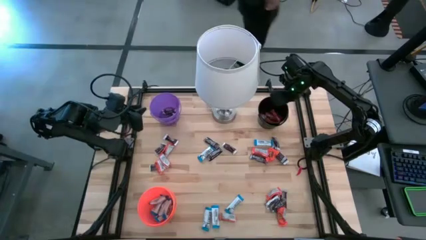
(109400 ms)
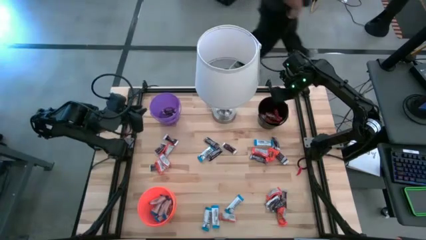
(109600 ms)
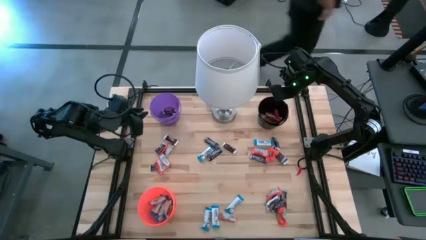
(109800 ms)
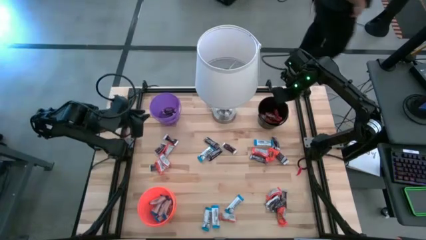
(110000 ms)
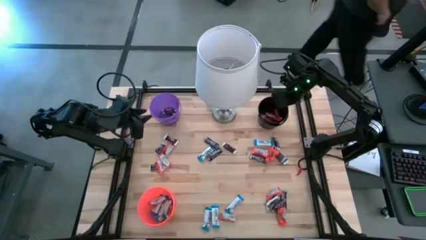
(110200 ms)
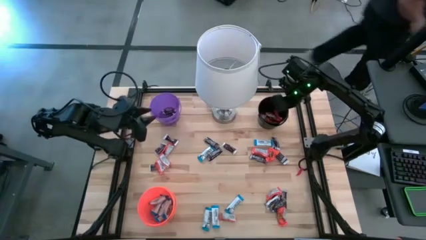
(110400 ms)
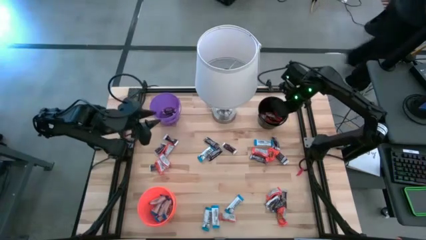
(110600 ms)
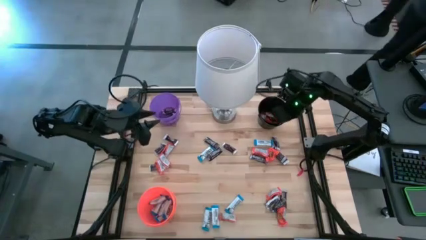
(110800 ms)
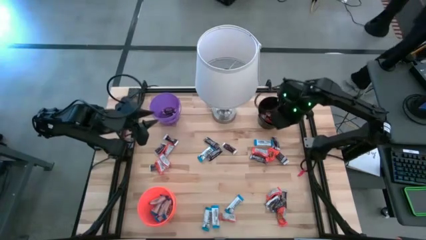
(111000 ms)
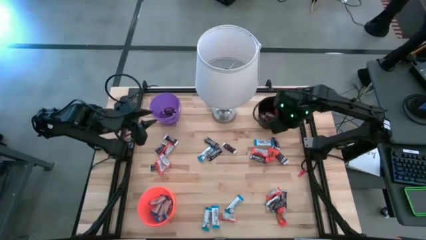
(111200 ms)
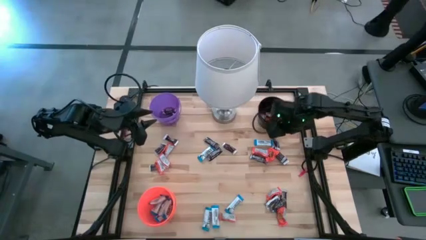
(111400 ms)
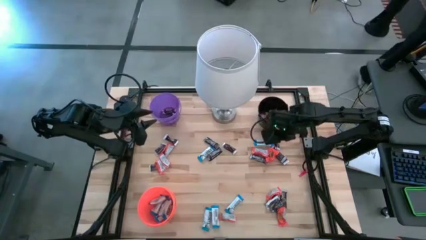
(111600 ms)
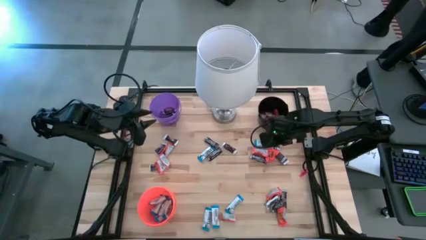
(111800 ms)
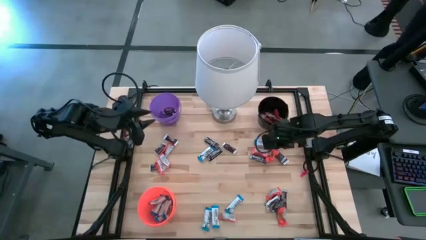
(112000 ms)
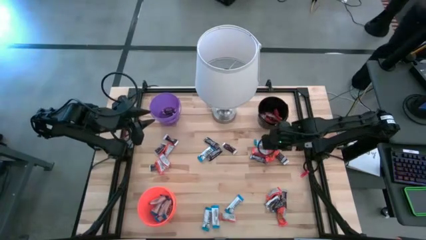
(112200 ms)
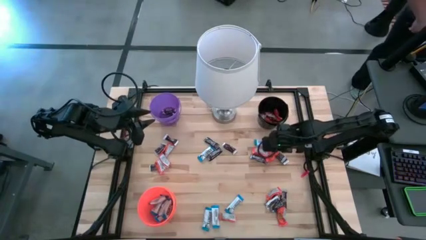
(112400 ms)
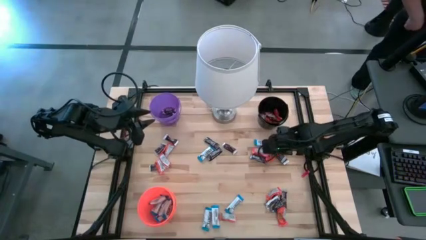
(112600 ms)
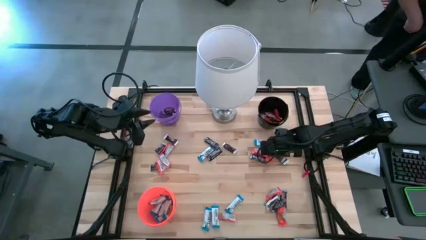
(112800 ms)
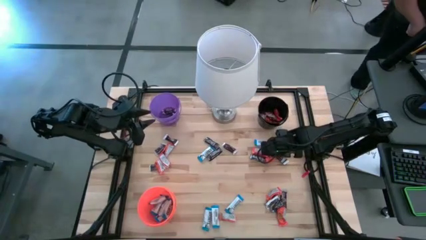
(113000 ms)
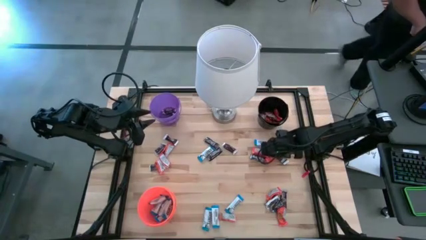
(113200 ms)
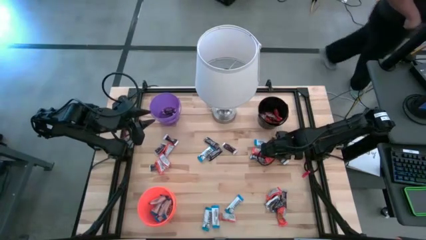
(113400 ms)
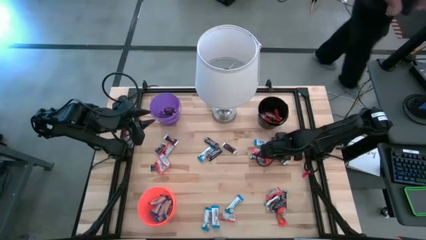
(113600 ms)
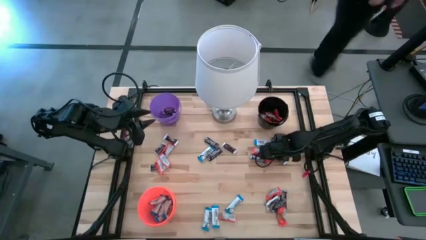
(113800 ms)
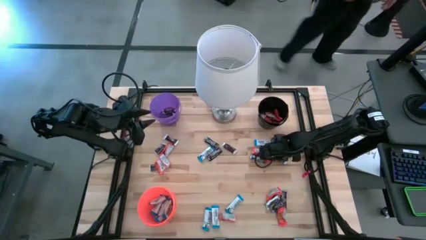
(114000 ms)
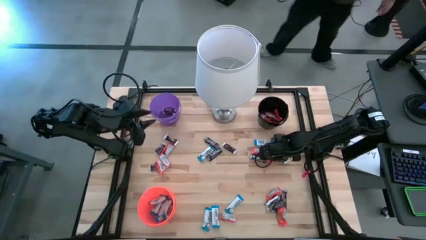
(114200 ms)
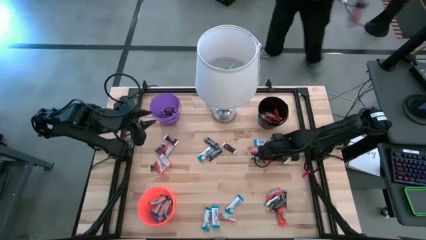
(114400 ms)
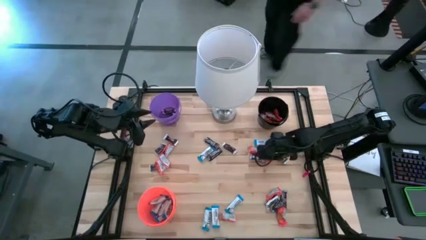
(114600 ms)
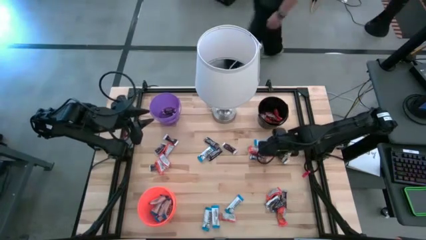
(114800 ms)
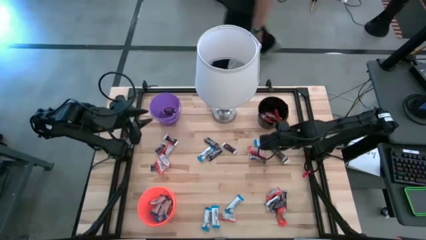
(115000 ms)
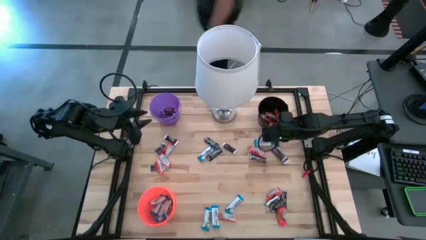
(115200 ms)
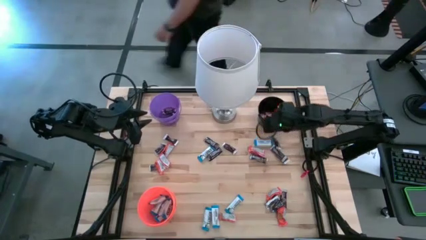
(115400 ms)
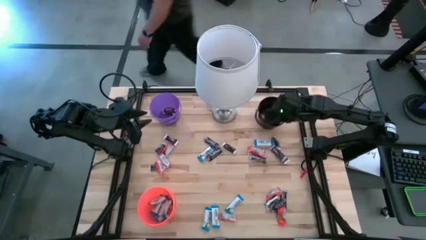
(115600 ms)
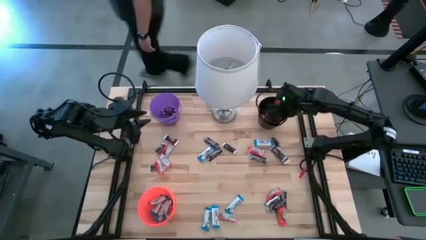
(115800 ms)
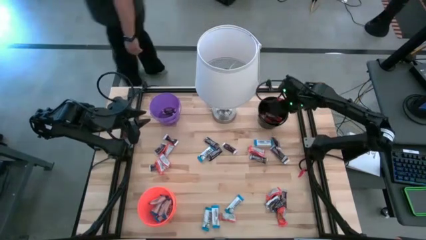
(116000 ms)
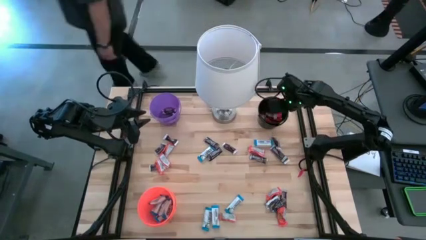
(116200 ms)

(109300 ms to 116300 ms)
Task: Organize candy in baskets
Put the orange chocolate bar into the black bucket

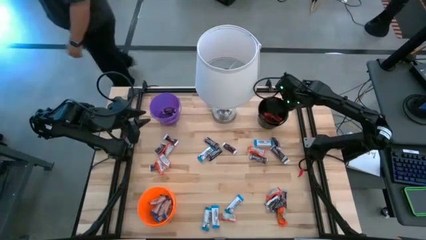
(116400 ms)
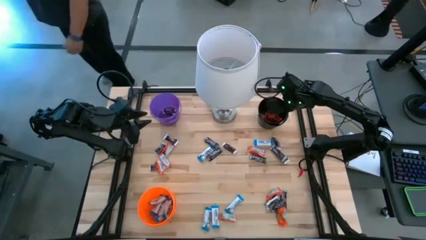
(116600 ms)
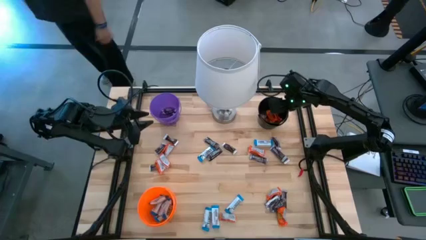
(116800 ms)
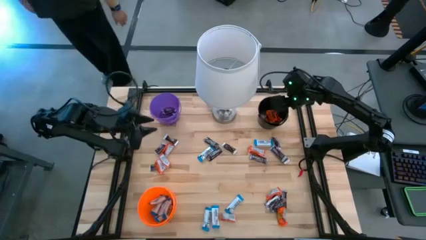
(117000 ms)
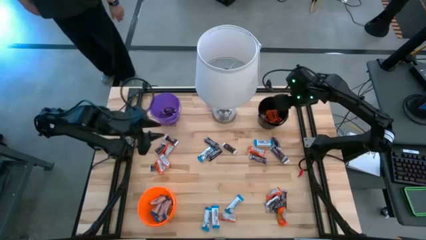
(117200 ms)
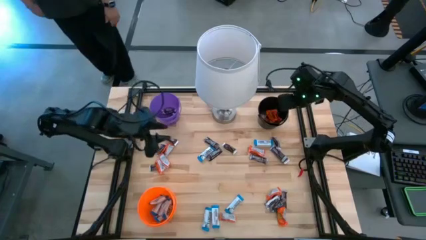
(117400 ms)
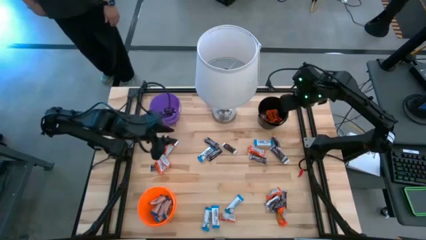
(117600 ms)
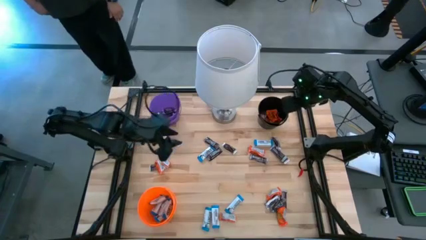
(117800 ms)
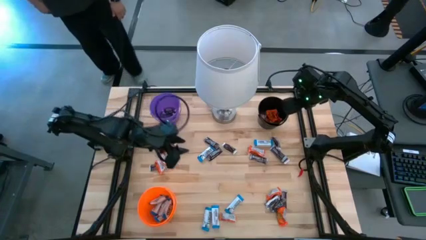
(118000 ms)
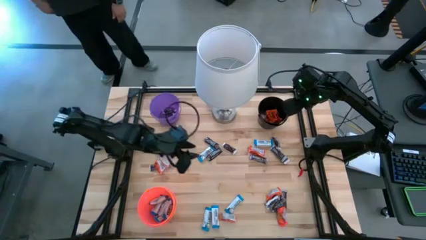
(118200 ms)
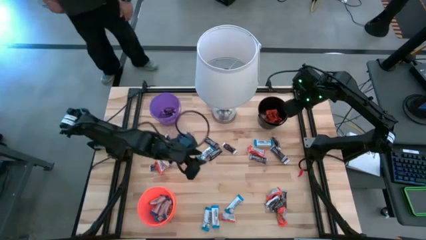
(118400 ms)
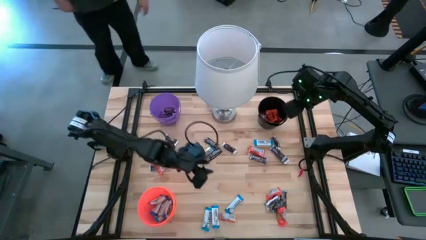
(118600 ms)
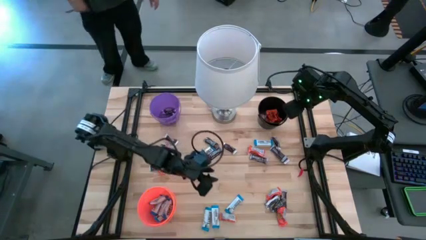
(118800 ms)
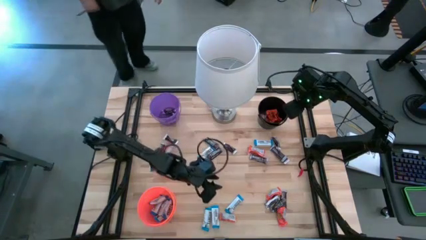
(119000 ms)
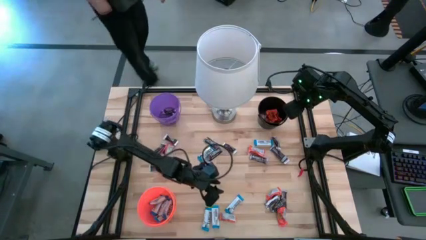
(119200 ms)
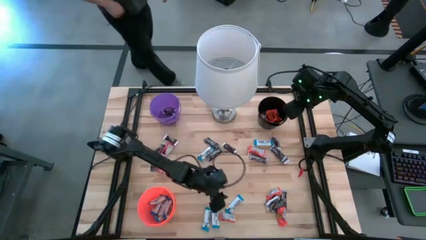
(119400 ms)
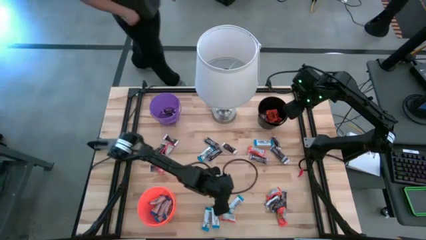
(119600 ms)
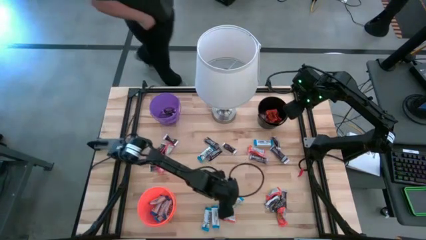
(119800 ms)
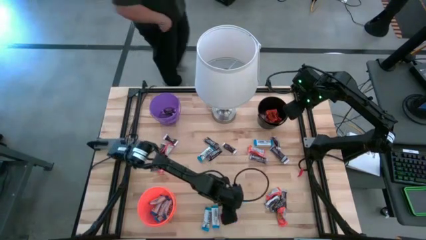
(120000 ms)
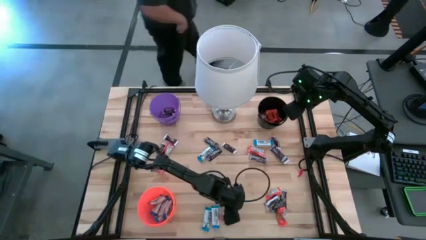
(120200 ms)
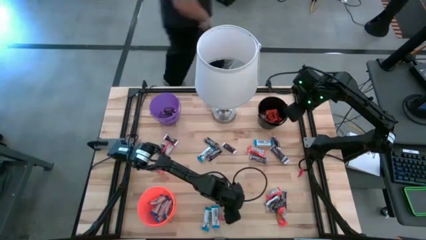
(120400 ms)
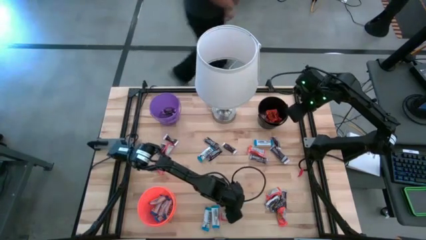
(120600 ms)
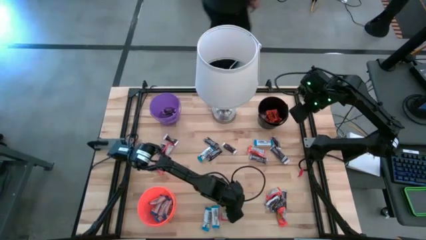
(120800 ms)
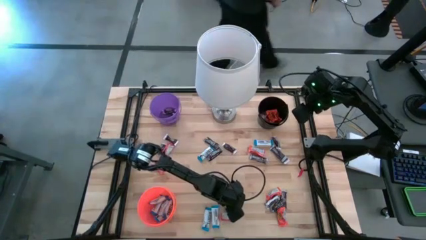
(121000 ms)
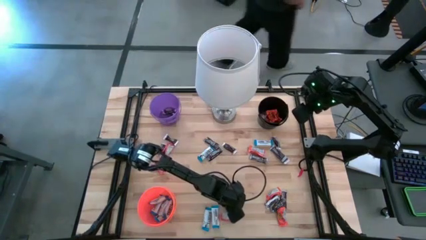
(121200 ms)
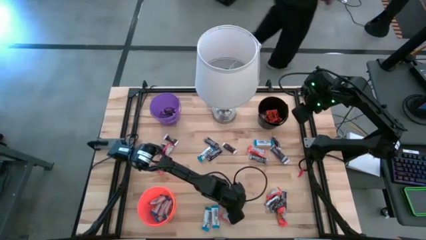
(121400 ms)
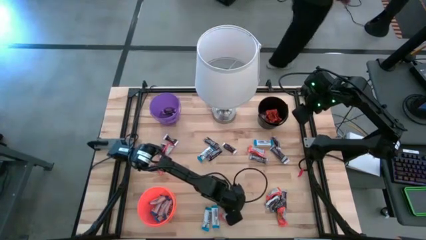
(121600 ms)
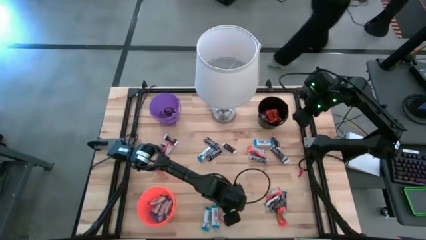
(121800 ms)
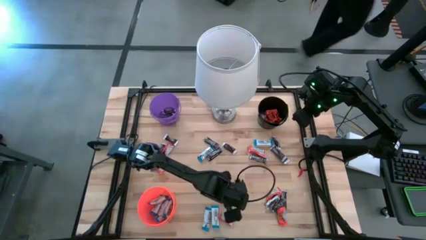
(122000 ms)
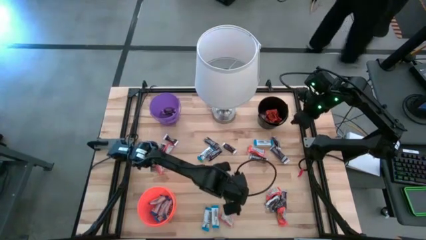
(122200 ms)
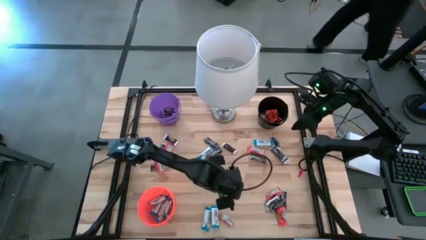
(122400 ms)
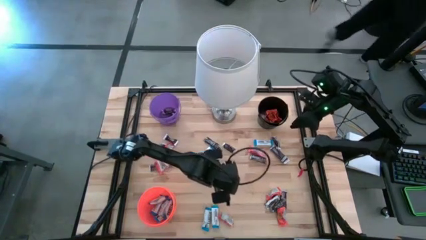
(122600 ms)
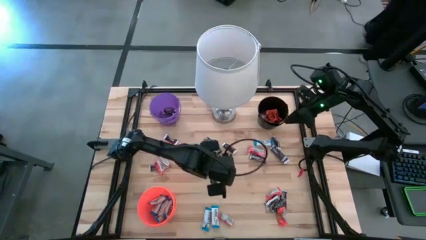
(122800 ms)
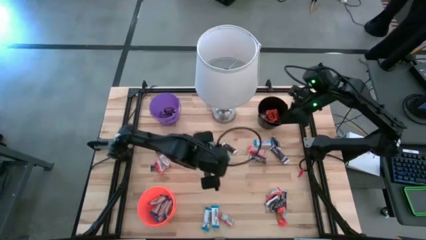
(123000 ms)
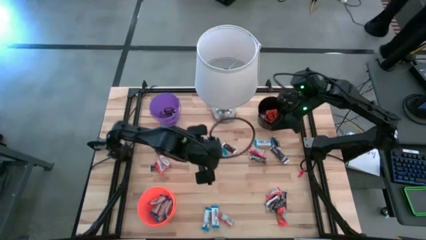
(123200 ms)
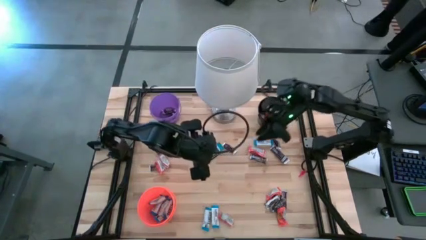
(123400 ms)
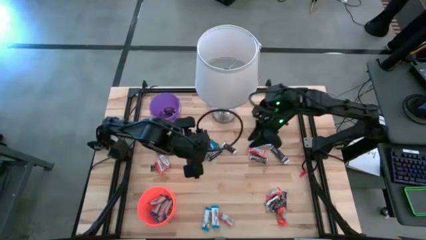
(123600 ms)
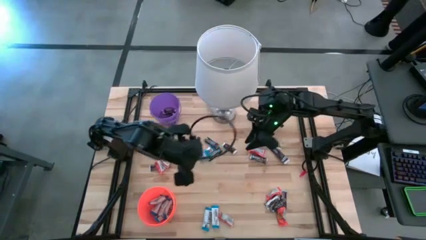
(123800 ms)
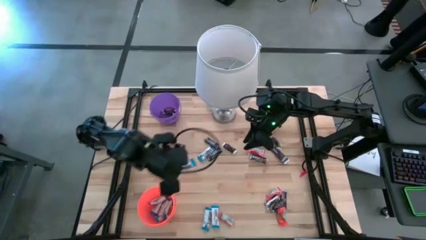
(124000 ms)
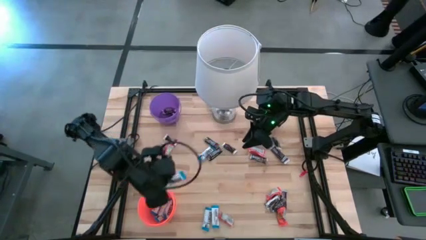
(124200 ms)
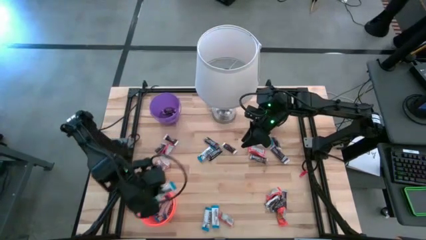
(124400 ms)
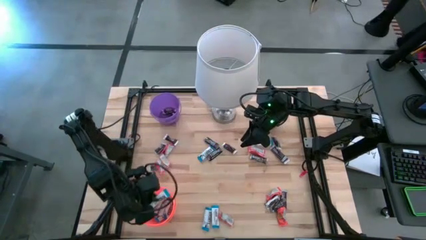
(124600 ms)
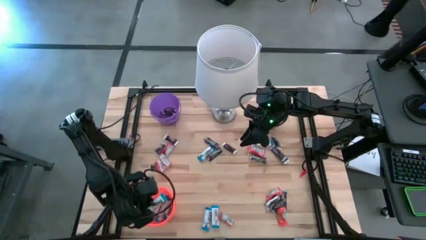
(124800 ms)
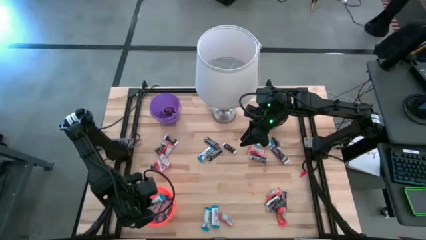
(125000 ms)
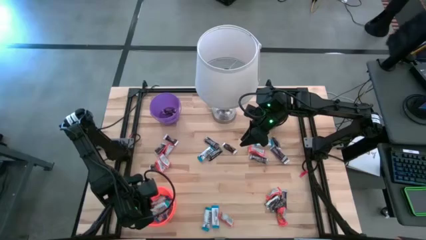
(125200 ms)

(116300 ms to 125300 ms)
Put the white chocolate bar into the orange bucket
